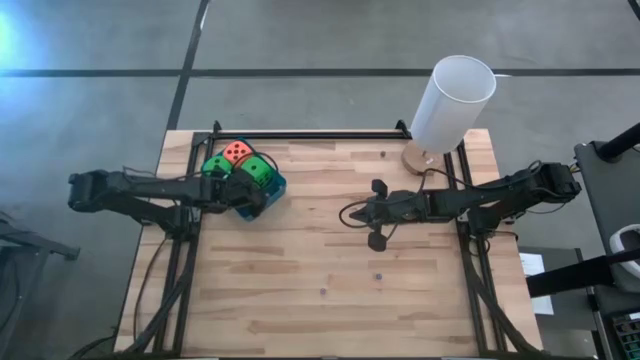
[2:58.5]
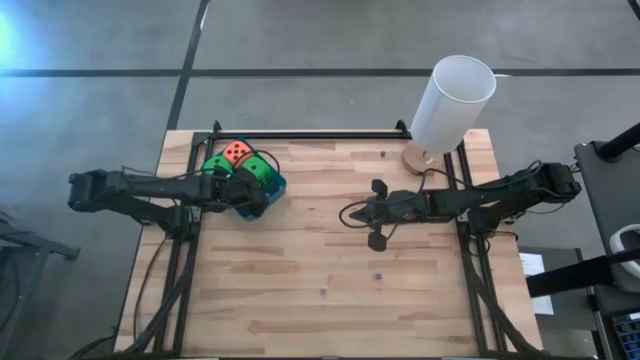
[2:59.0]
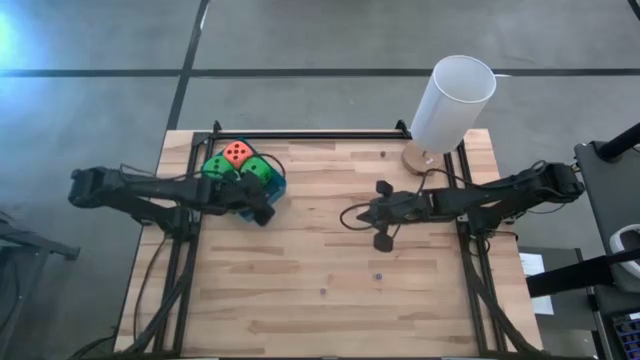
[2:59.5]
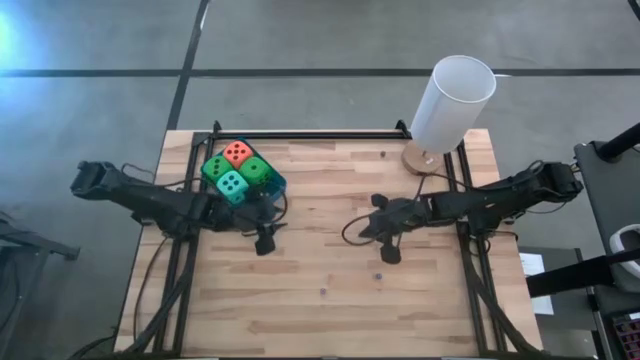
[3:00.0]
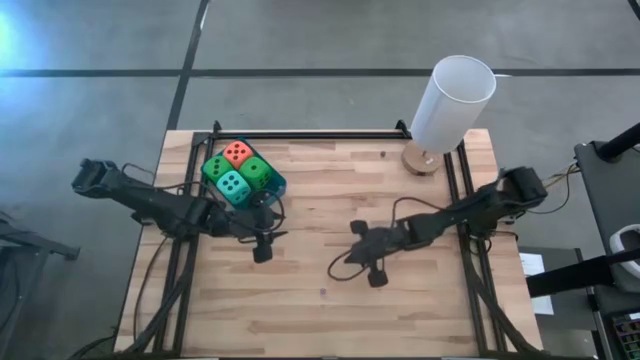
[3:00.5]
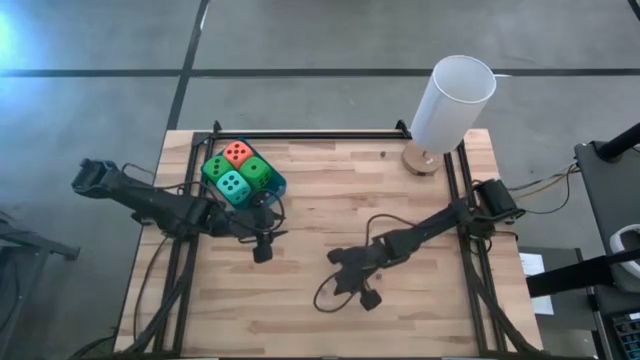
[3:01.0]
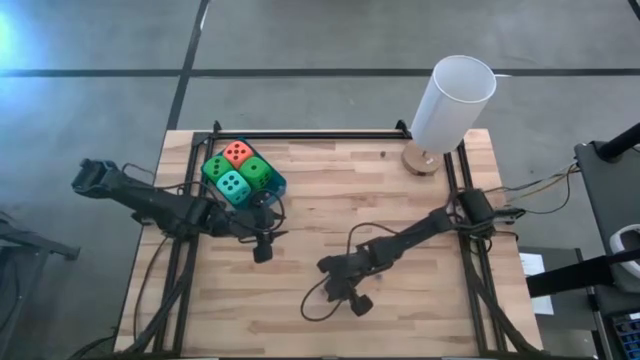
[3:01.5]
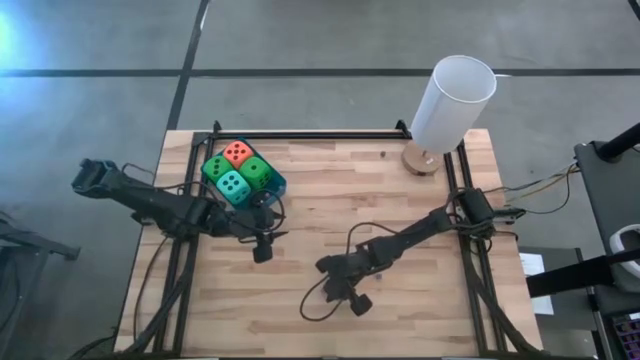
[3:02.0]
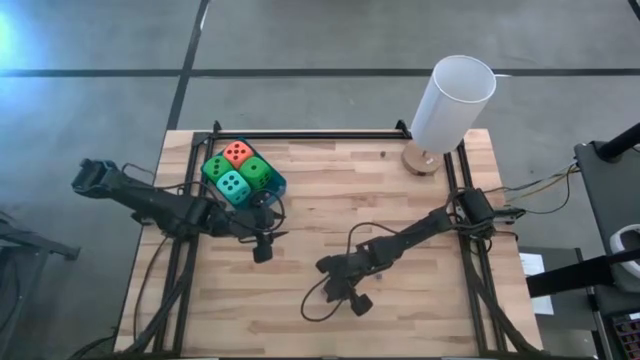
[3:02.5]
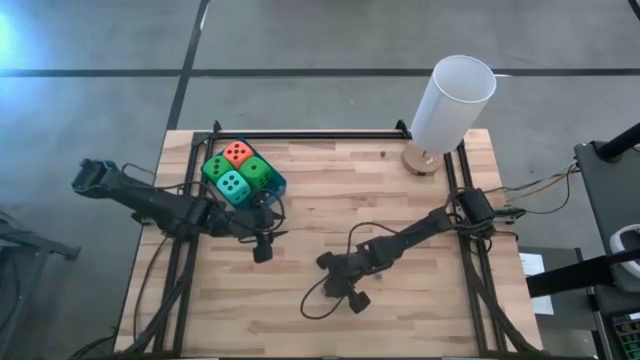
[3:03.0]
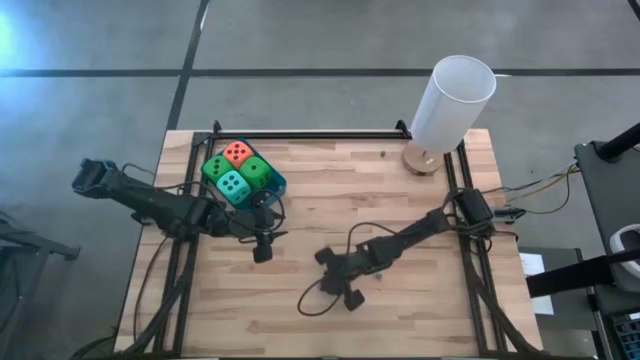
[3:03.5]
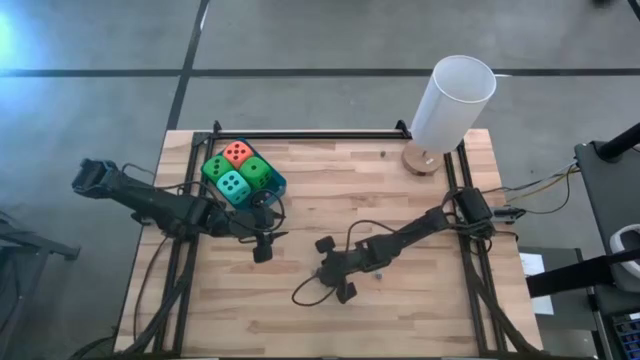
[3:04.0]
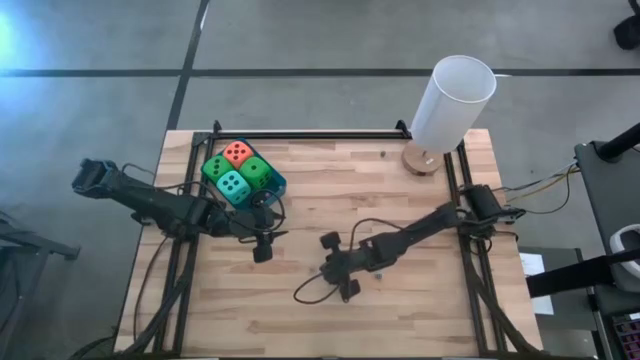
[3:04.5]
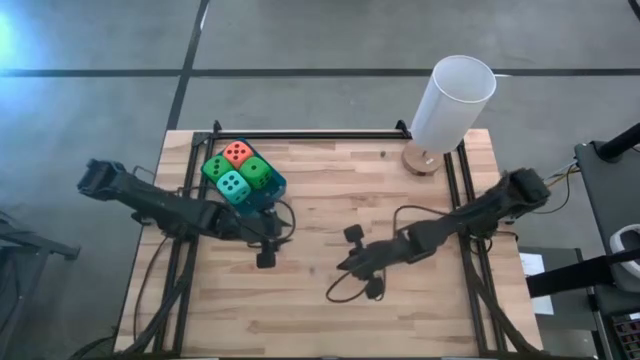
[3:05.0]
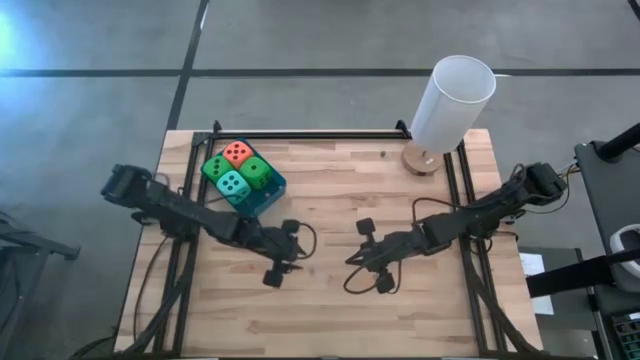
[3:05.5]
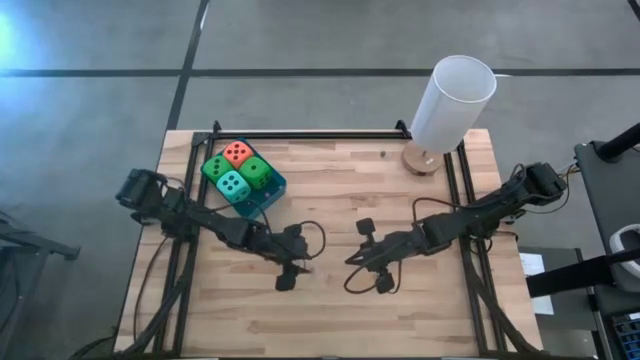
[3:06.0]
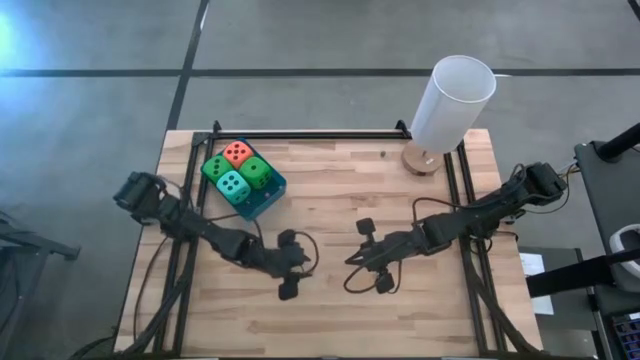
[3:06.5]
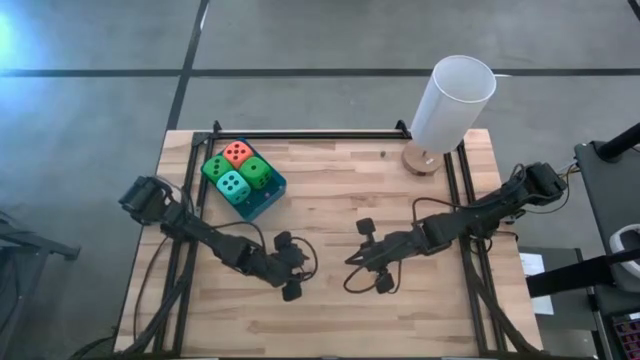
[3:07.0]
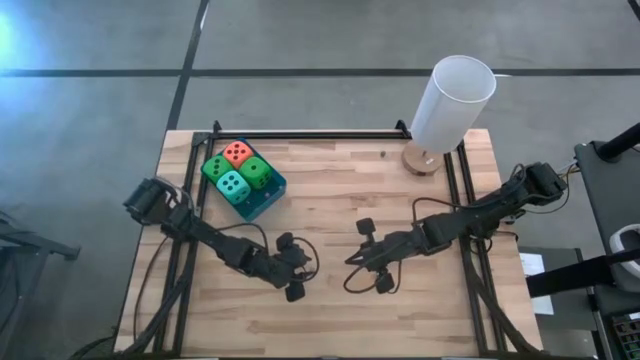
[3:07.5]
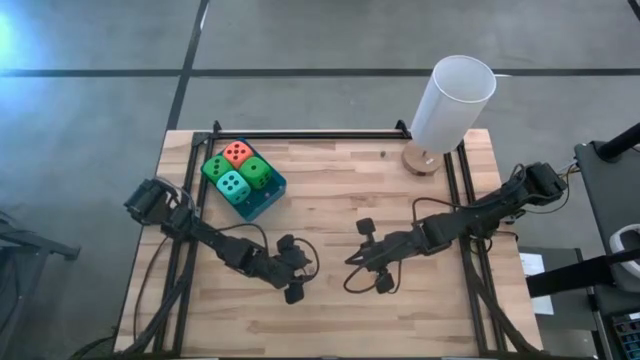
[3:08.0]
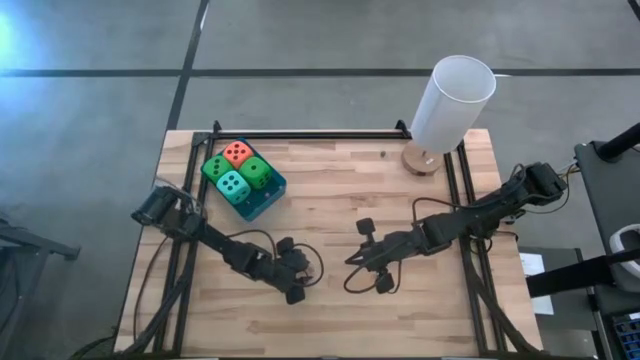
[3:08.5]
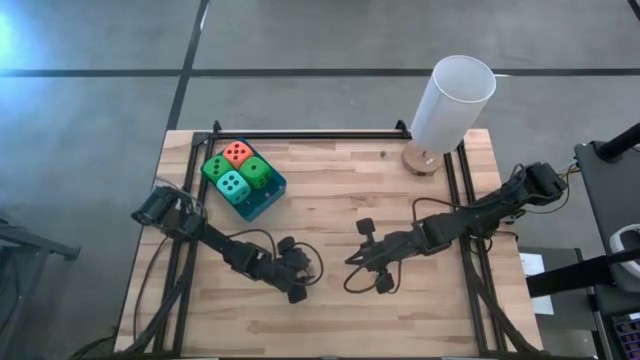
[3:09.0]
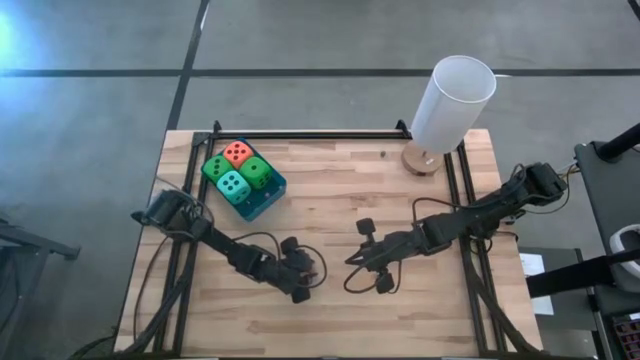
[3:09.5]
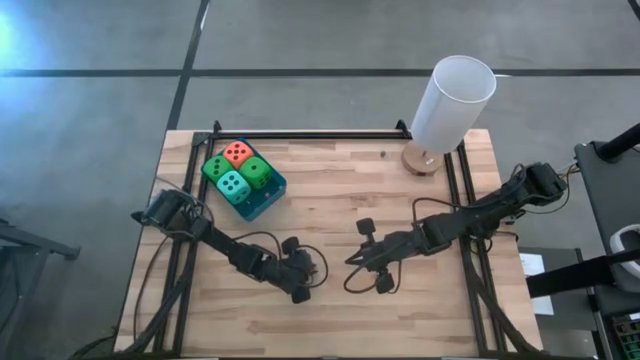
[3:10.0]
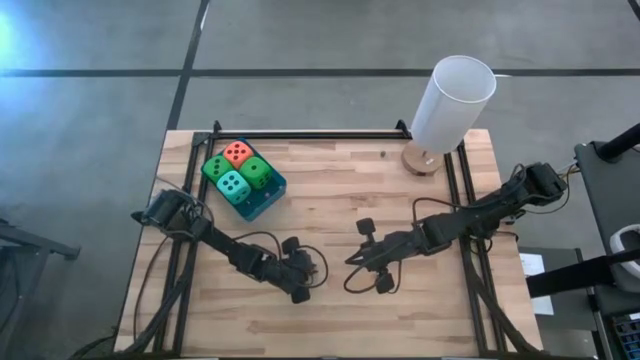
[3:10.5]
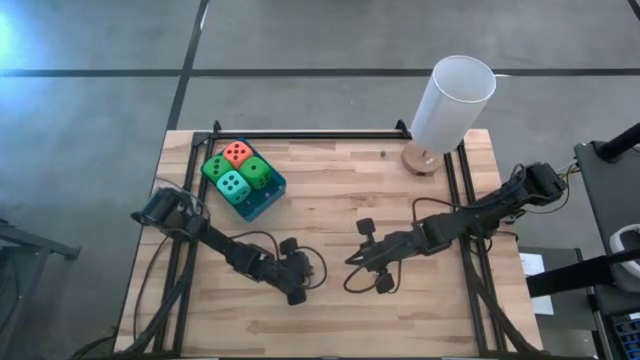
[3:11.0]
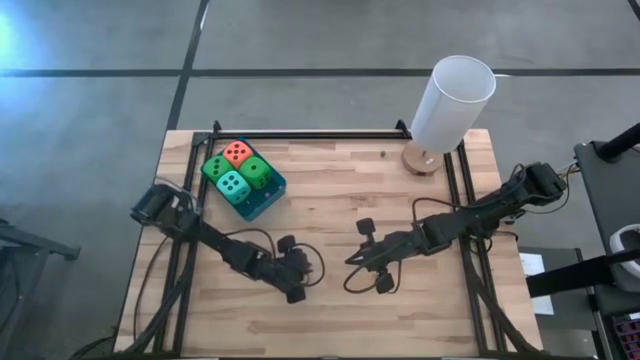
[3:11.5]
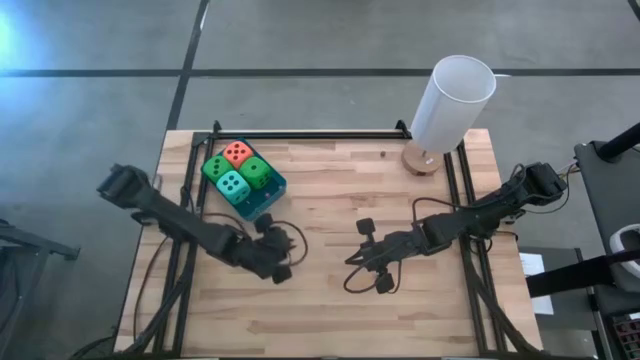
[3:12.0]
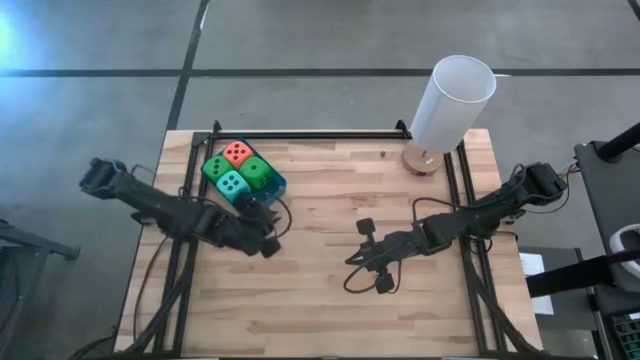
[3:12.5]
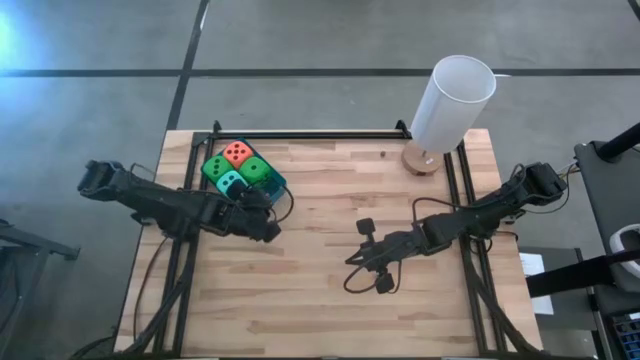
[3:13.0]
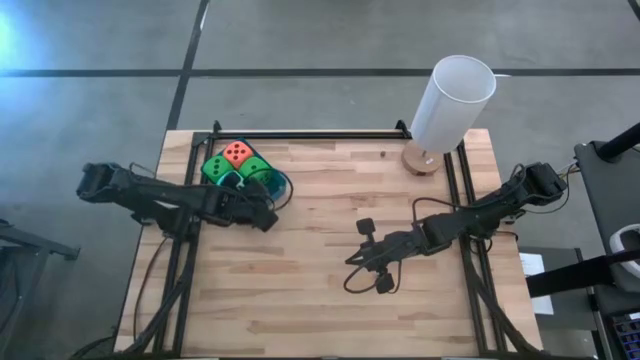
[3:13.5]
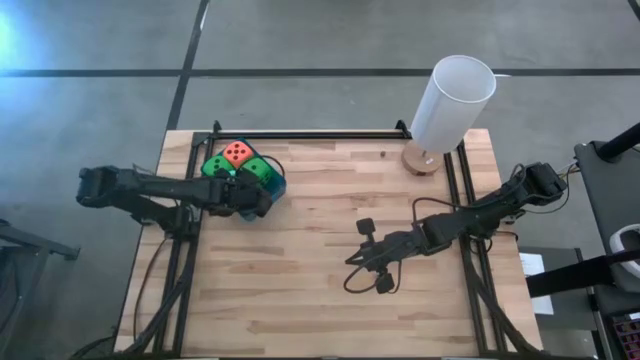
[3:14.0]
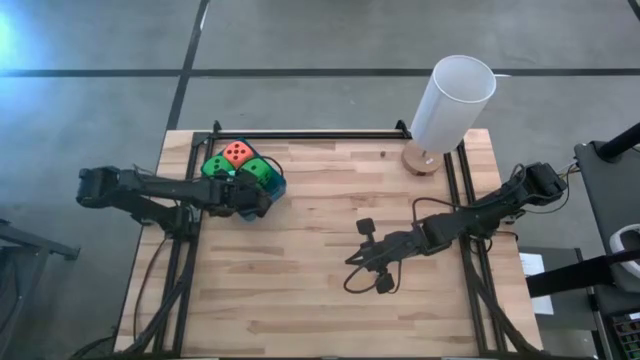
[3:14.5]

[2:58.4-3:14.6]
Task: Pick & Place Dice
Put the small violet dice into the blue bin

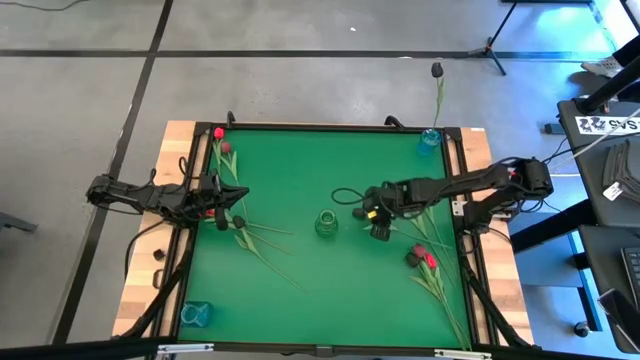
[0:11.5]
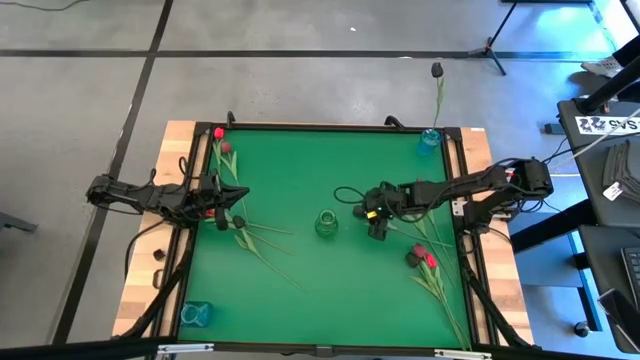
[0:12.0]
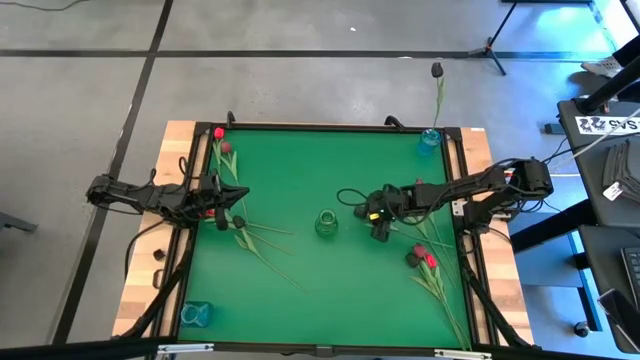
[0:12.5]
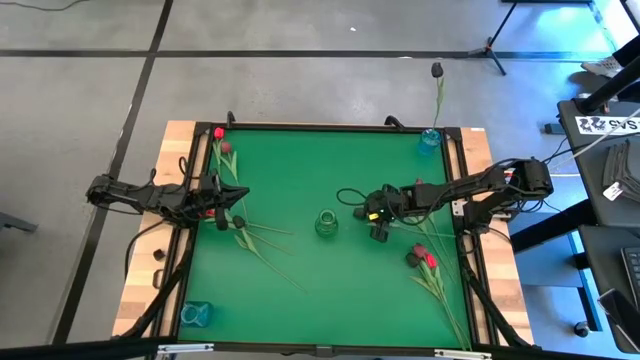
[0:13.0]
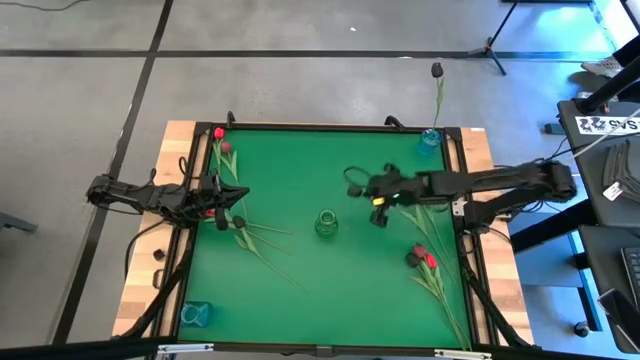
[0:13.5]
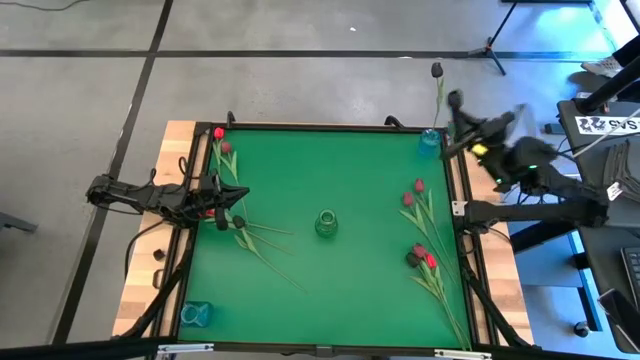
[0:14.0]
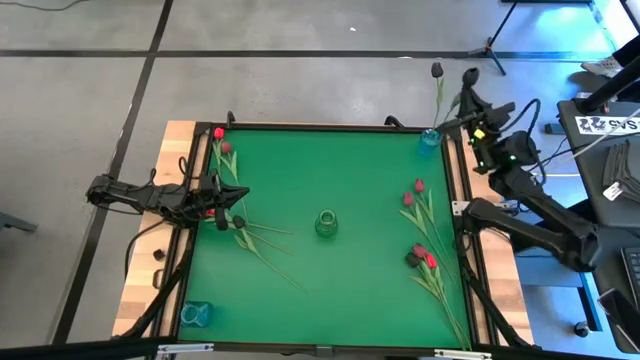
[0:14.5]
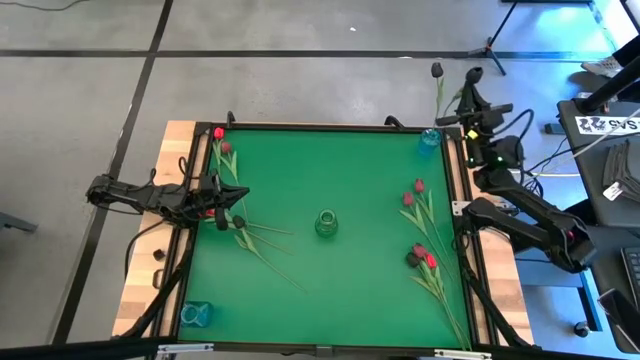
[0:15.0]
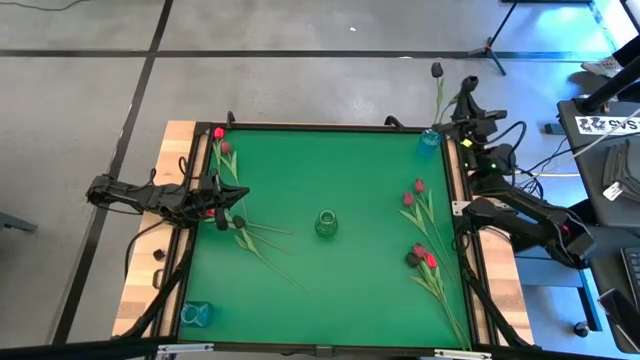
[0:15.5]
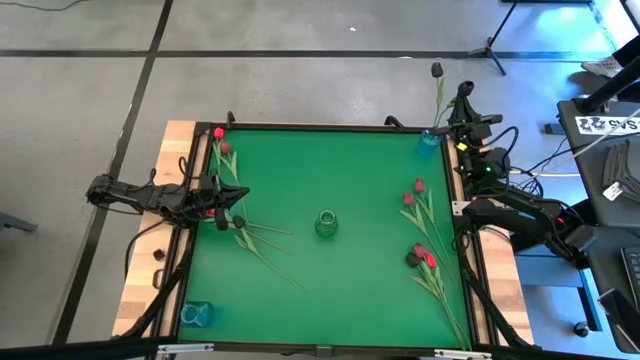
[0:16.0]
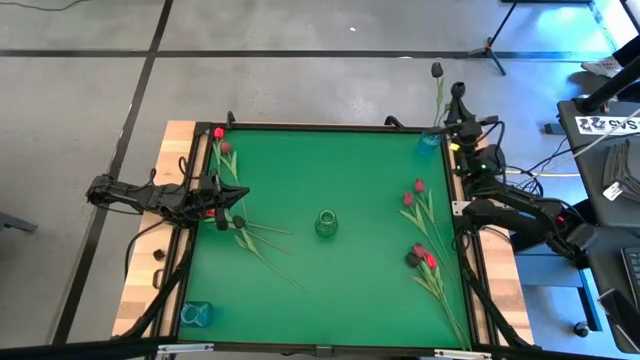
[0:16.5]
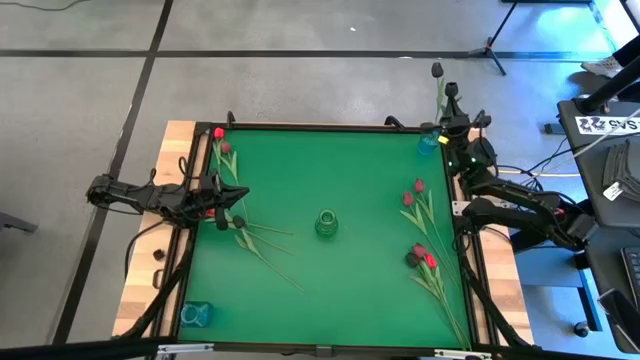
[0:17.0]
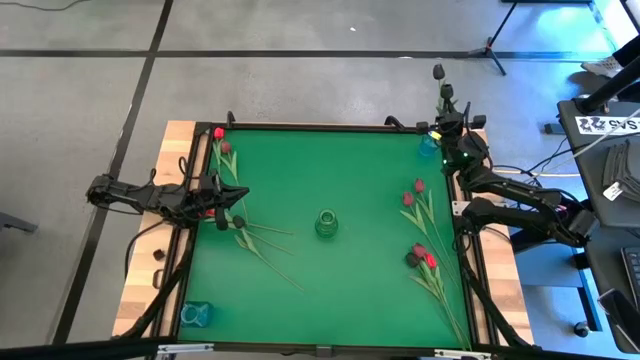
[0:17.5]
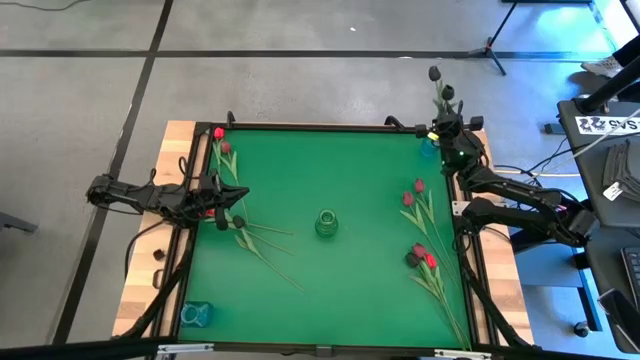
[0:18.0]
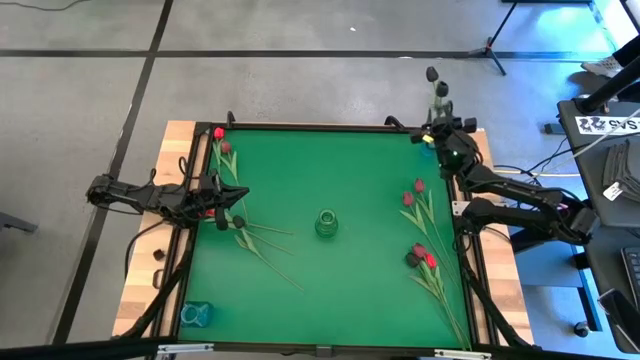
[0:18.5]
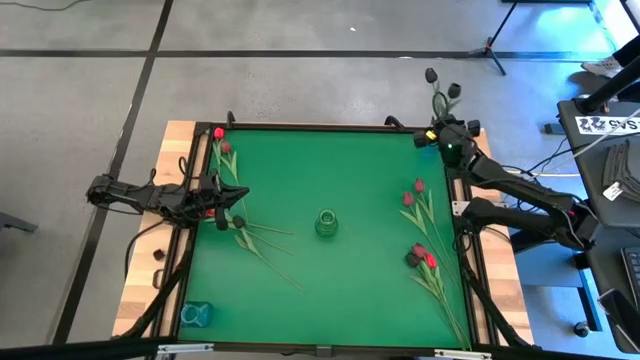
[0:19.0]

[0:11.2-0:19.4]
Task: Sort flowers into vase by color
Put the top right black flower into the top right blue vase
